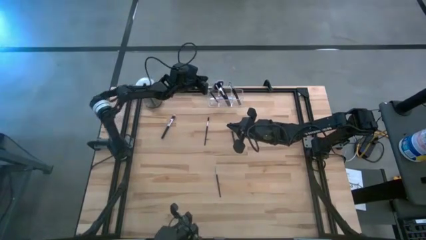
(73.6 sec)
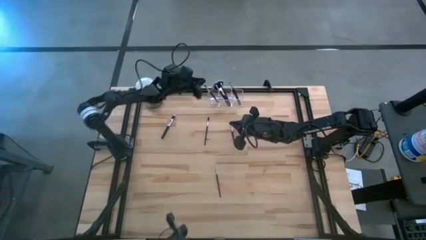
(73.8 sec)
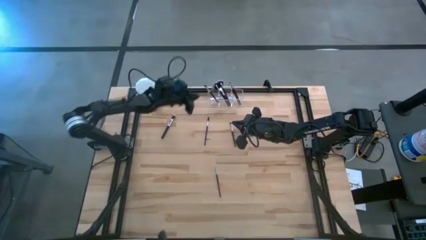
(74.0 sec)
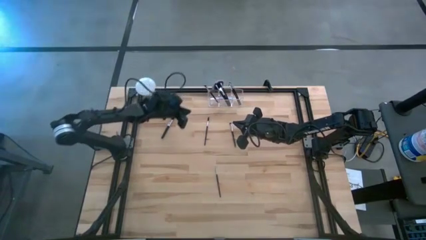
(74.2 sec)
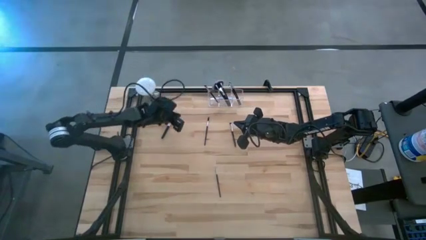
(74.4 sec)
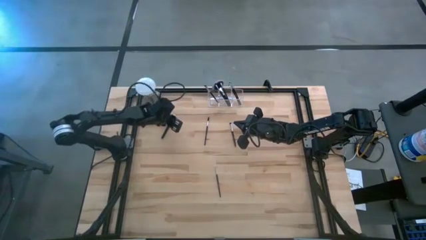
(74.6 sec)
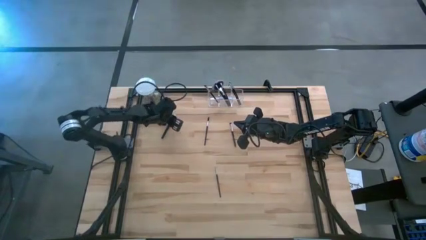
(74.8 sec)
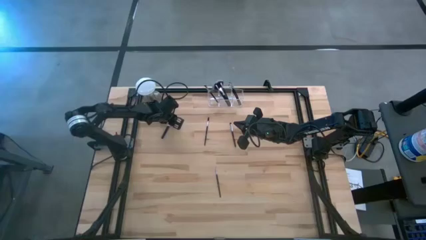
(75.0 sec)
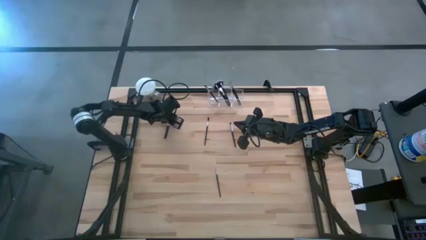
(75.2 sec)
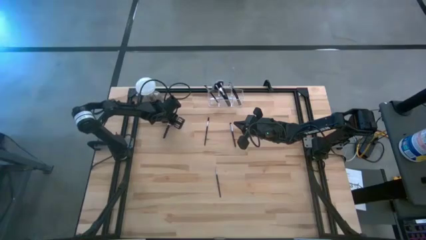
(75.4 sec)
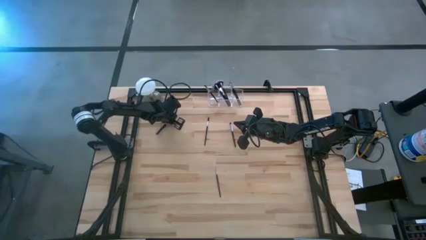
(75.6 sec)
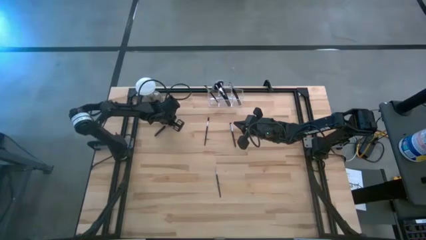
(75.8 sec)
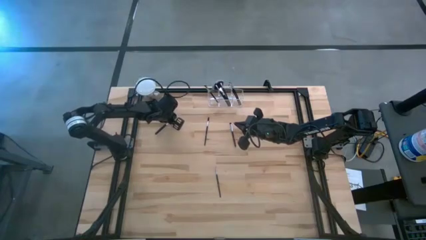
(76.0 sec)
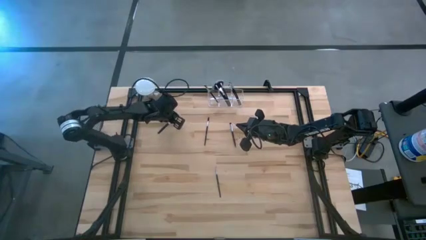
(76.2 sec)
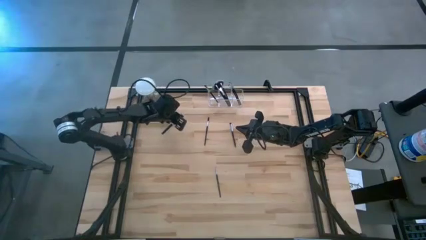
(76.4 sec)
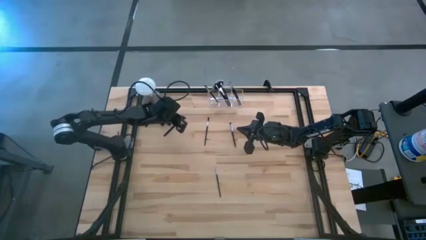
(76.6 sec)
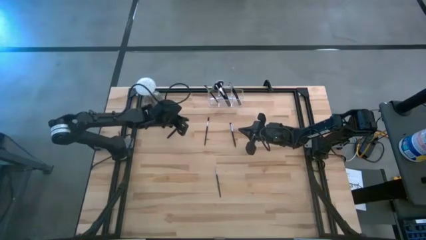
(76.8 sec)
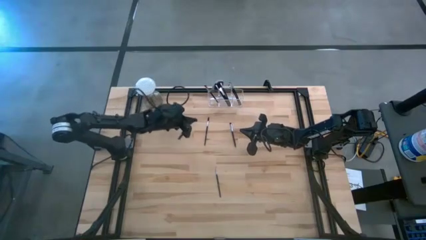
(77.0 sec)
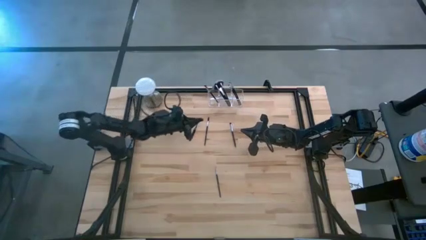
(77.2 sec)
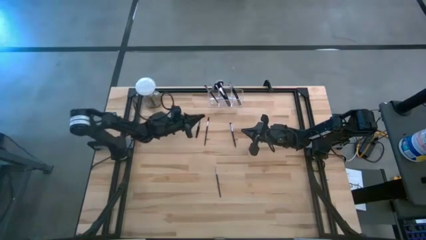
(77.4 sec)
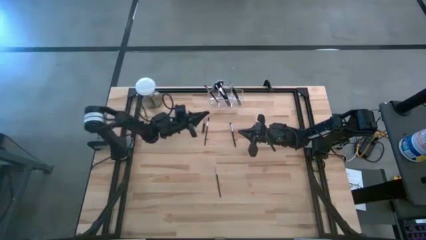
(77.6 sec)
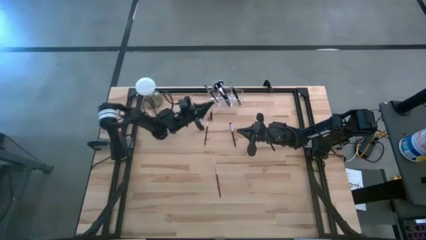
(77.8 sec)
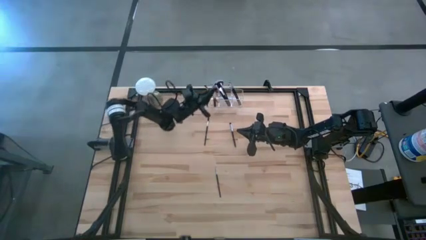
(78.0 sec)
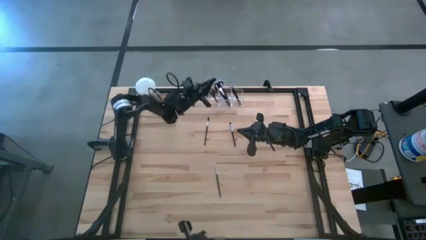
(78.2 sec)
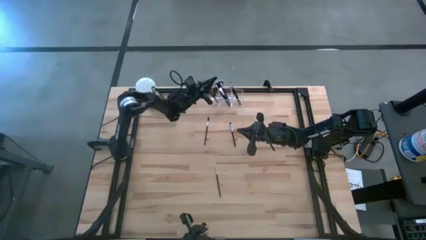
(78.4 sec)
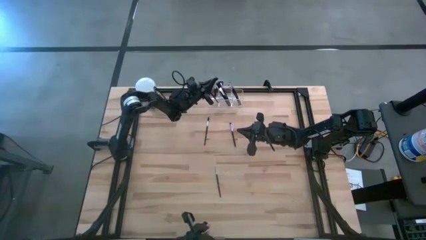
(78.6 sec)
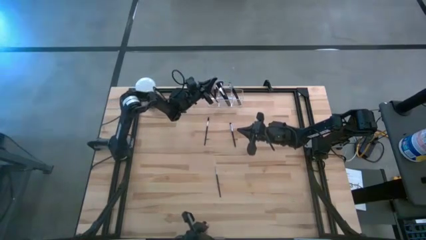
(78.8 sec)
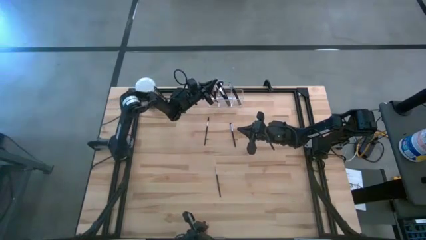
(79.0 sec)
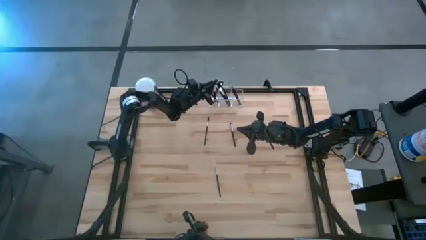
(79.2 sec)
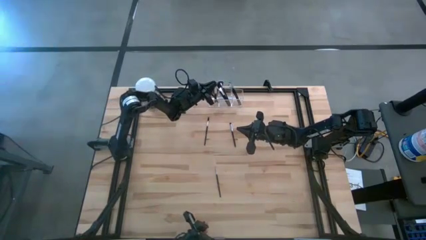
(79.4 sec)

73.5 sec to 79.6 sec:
Task: Pick & Place Makeup Brushes
Put the black foundation brush into the transparent organizer

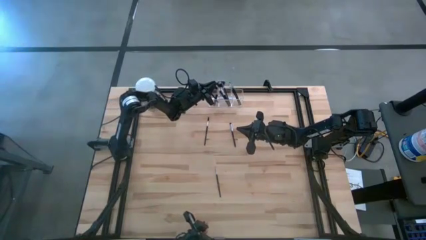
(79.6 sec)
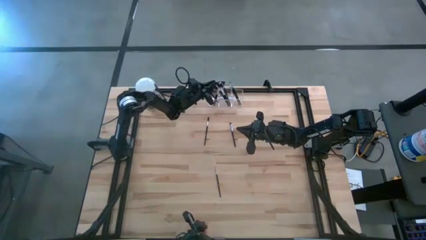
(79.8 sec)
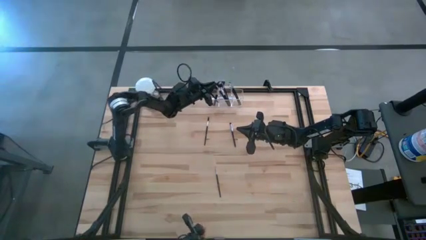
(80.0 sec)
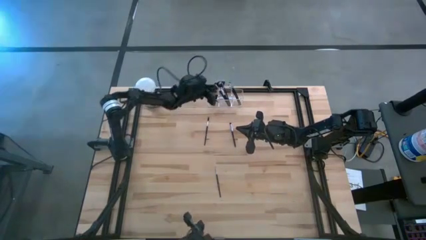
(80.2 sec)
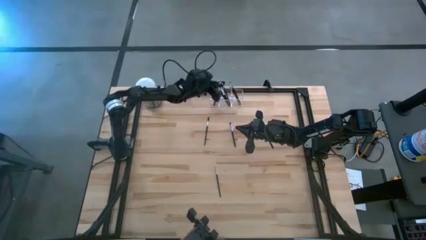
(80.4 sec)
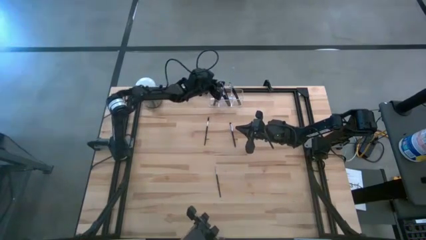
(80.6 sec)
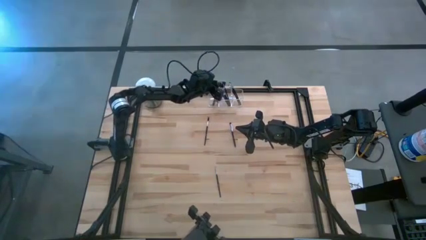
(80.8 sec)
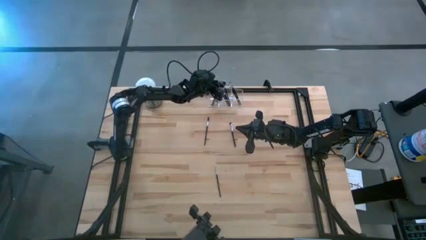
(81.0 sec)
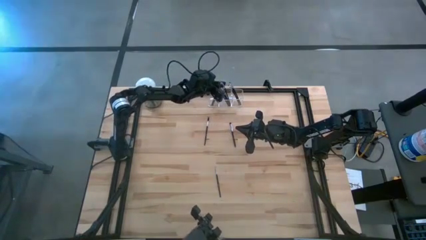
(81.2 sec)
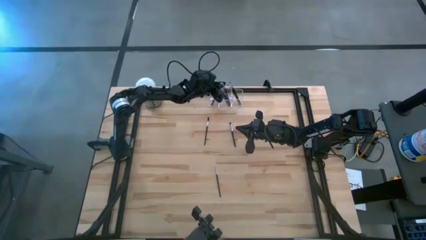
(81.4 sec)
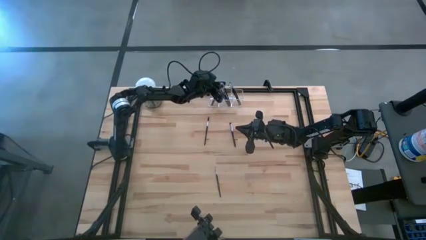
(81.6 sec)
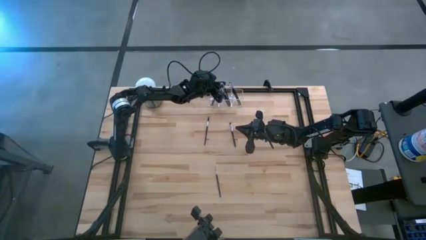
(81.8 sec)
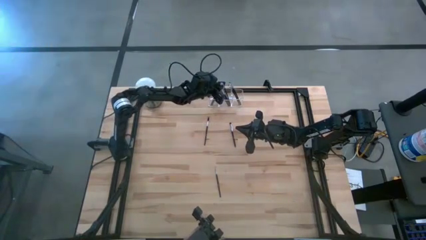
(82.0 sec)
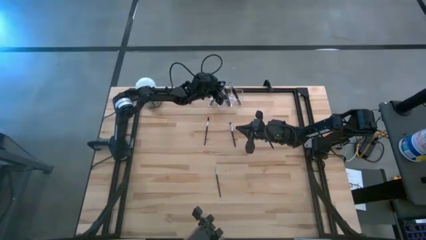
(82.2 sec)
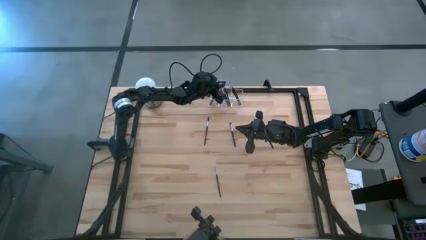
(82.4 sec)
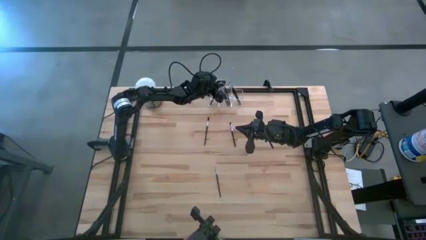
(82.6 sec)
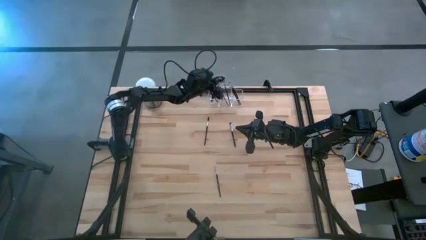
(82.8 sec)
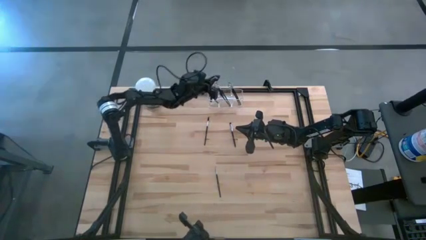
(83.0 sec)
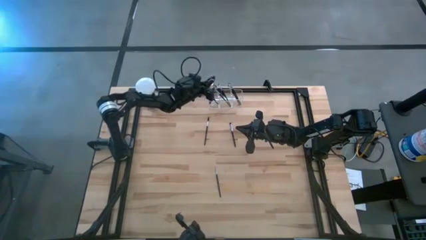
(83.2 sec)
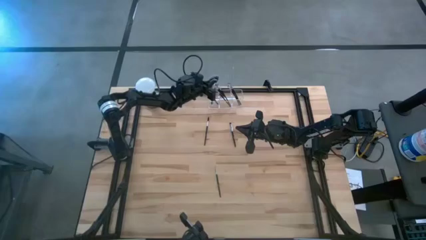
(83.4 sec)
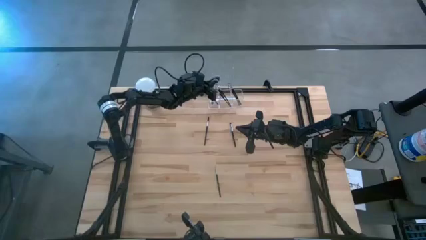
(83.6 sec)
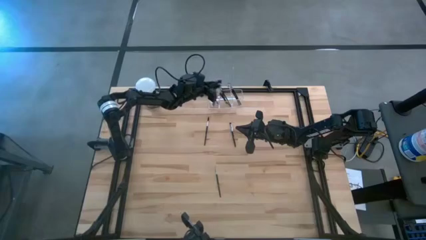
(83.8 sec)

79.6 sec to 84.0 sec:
Adjust the makeup brushes in the transparent organizer

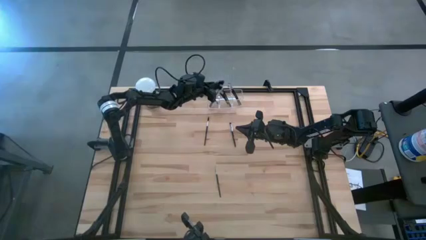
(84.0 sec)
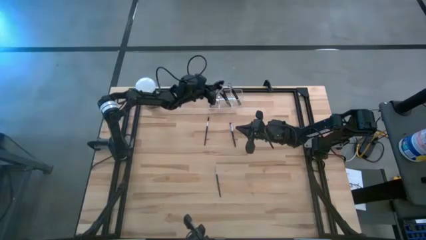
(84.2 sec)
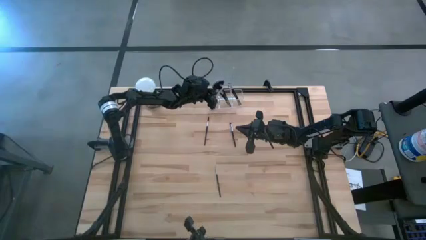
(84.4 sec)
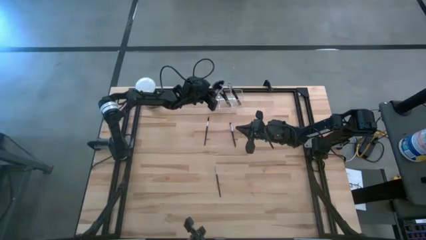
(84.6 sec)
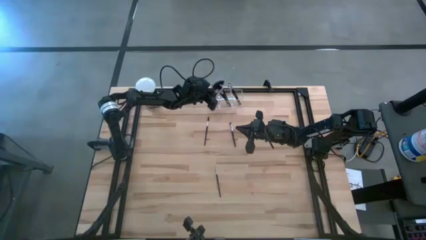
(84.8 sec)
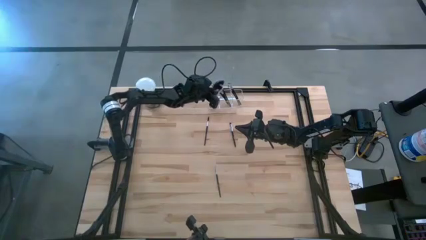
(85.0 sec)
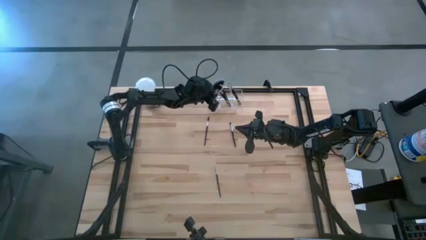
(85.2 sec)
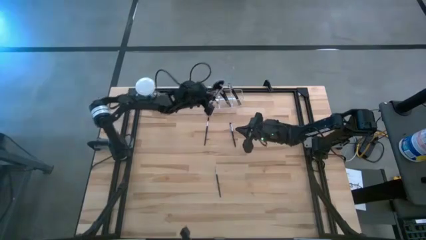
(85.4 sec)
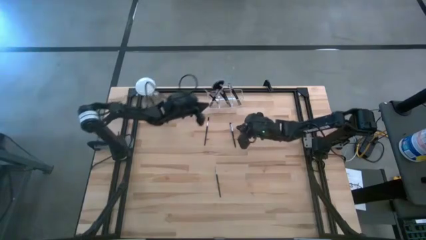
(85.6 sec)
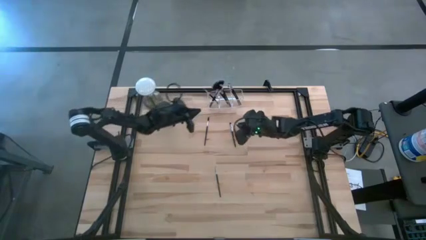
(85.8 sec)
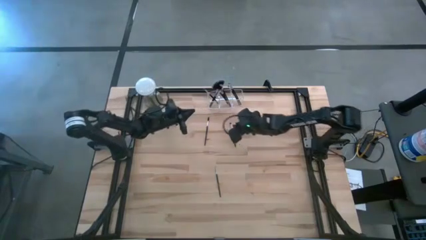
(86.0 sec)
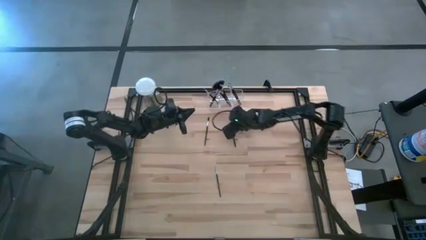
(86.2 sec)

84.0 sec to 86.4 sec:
Put the black eyeshadow brush into the transparent organizer

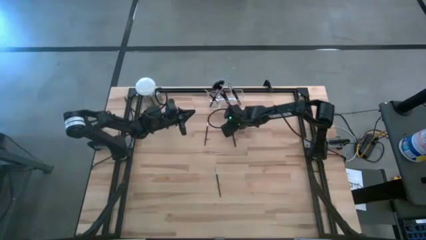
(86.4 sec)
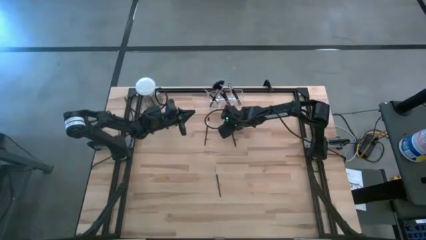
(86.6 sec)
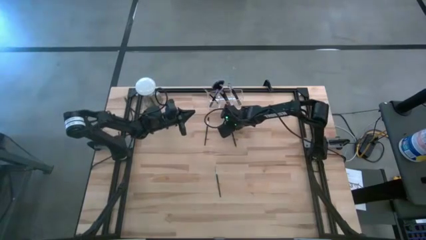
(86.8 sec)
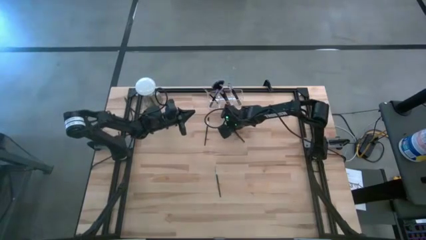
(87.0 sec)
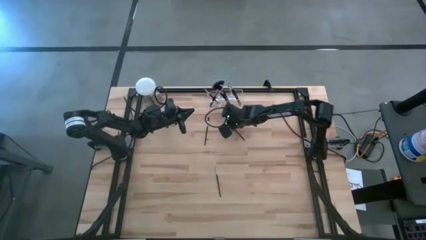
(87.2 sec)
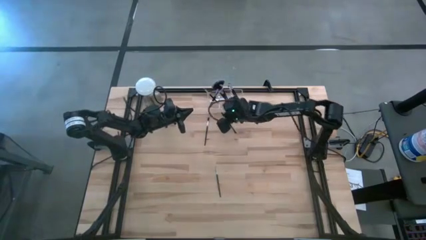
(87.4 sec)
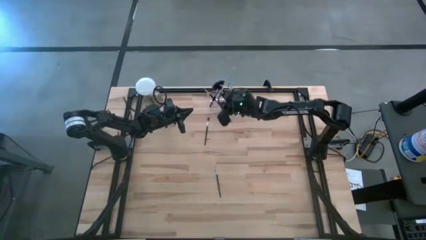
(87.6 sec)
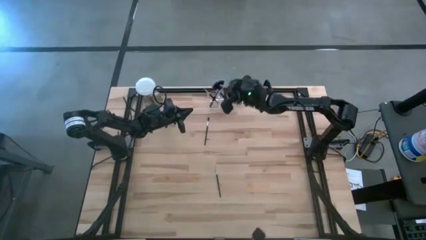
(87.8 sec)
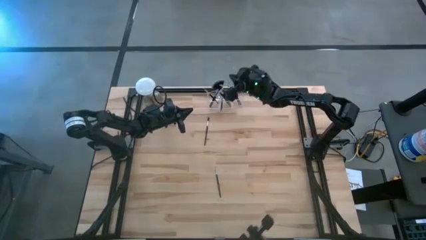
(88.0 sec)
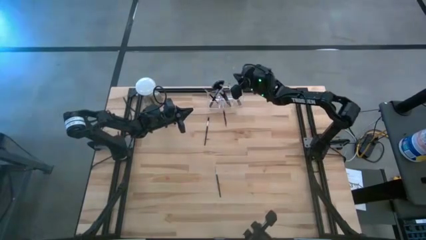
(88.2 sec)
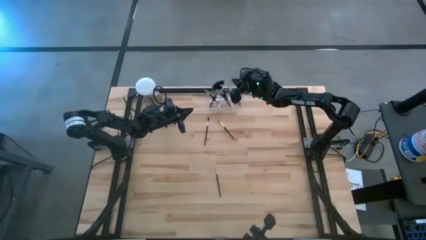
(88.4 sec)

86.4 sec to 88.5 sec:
Put the black eyeshadow brush into the transparent organizer

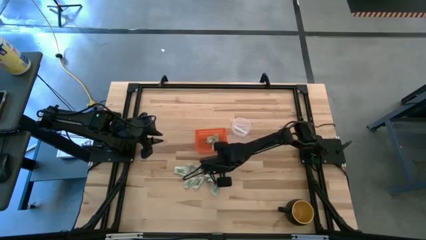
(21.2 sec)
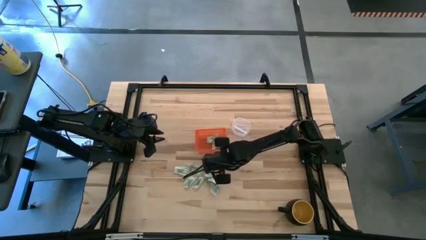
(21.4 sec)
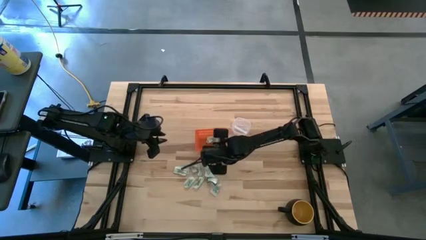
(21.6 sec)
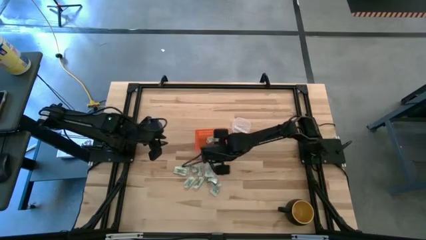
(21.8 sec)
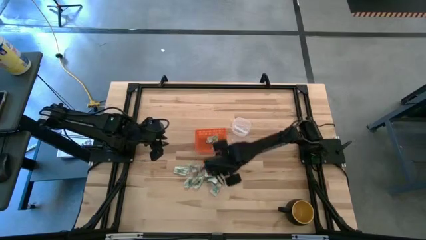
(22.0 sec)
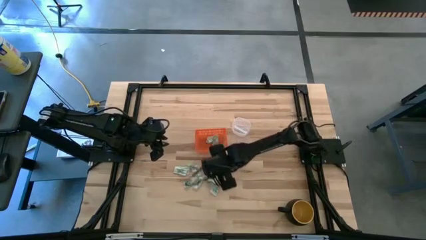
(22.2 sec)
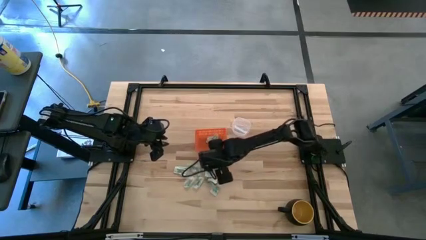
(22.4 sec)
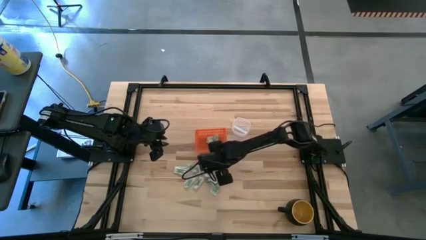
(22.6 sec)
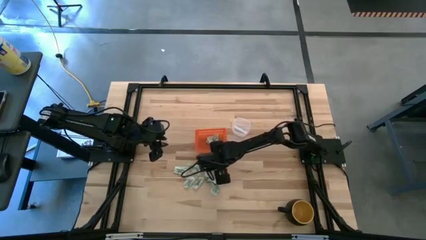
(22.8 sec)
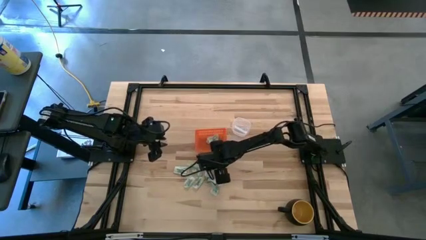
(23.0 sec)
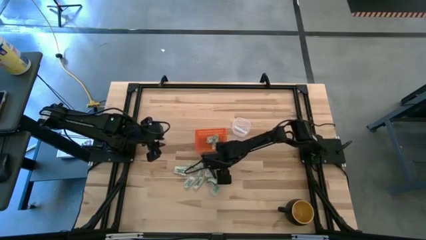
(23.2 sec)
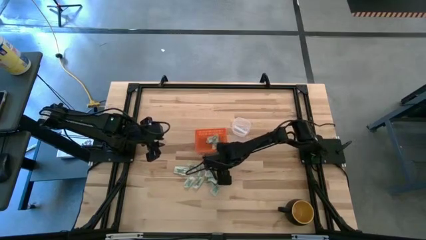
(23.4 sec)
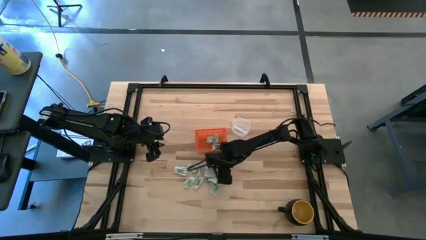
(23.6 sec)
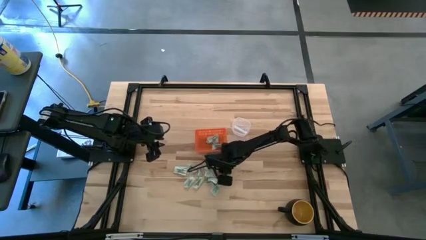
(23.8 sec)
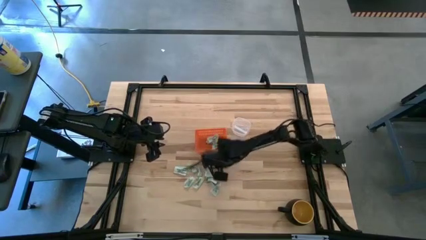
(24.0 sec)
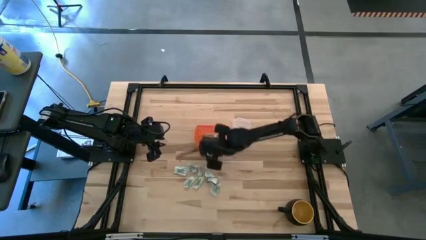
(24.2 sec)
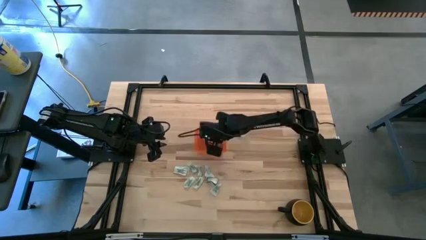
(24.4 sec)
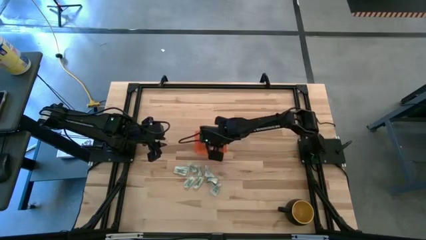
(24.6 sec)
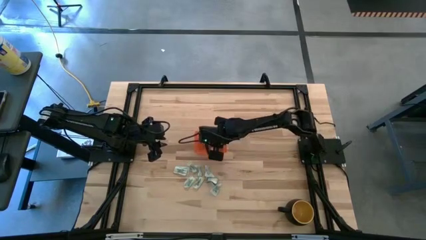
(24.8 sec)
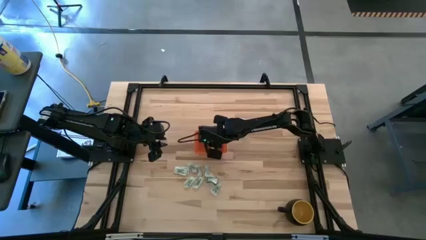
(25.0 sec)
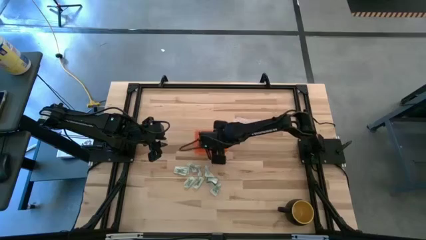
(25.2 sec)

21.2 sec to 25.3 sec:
Task: Pick and place Stevia / Truvia into bins
Put the stevia packet into the basket
